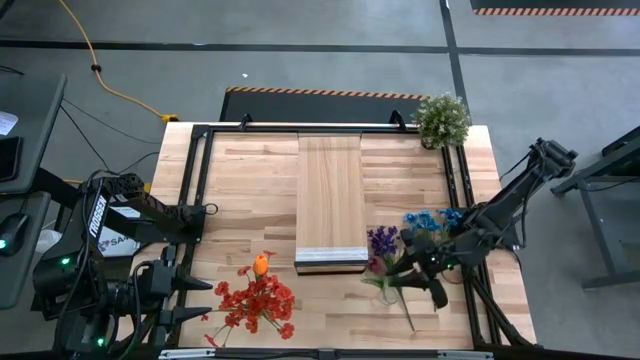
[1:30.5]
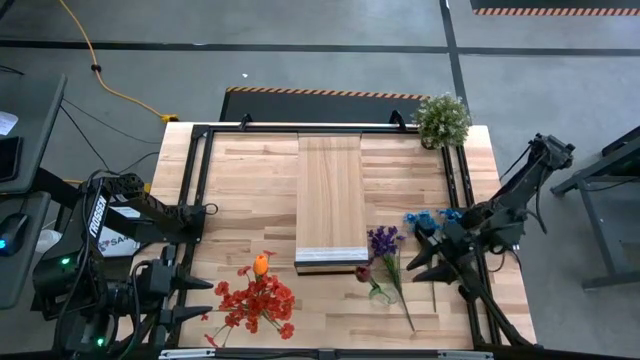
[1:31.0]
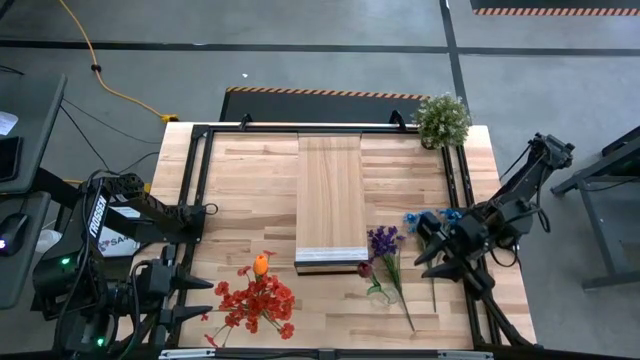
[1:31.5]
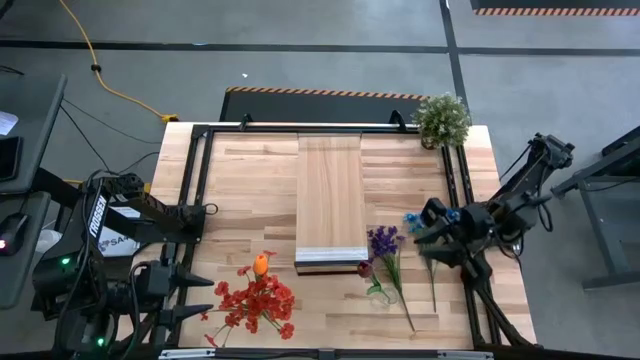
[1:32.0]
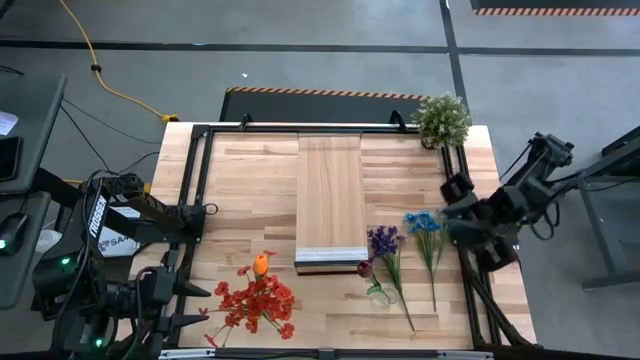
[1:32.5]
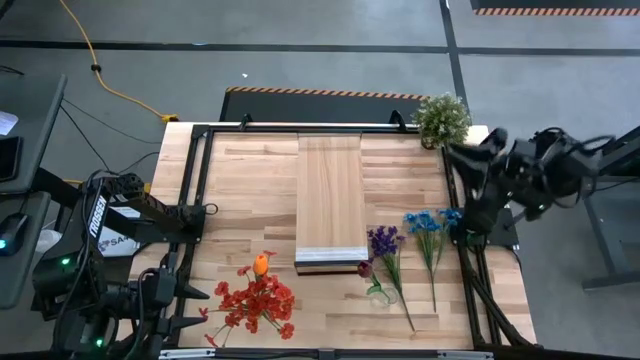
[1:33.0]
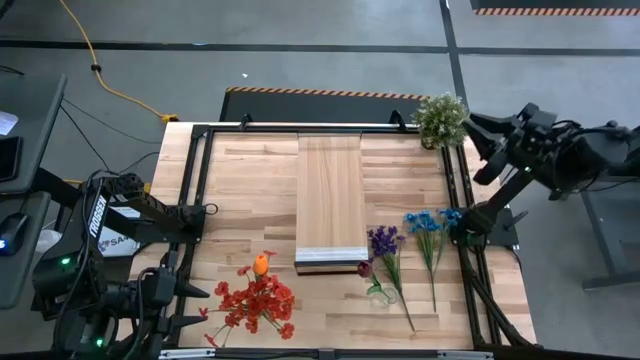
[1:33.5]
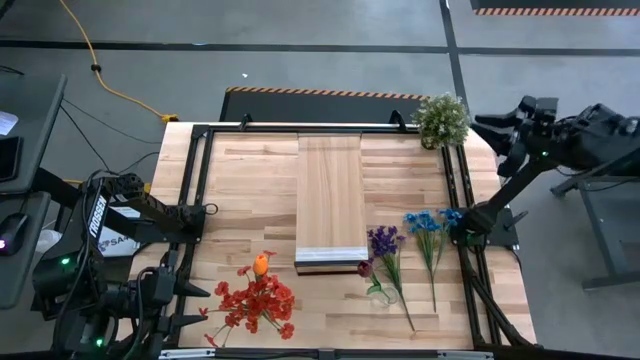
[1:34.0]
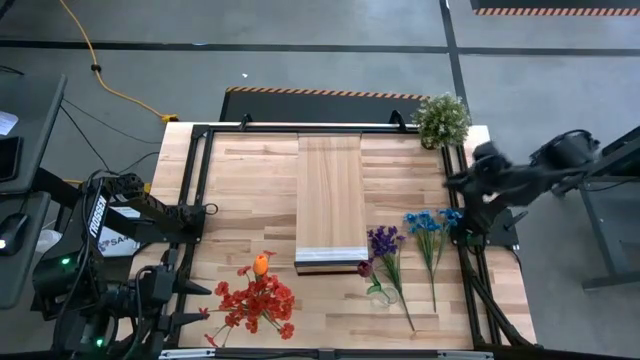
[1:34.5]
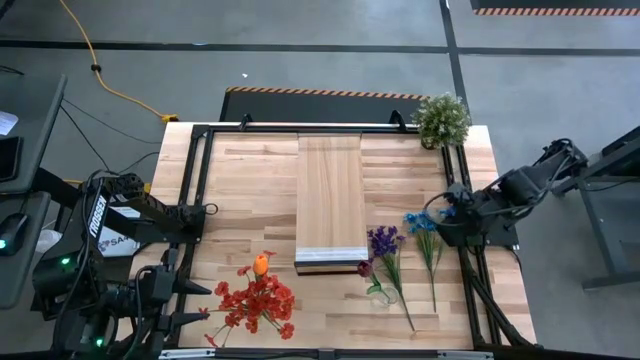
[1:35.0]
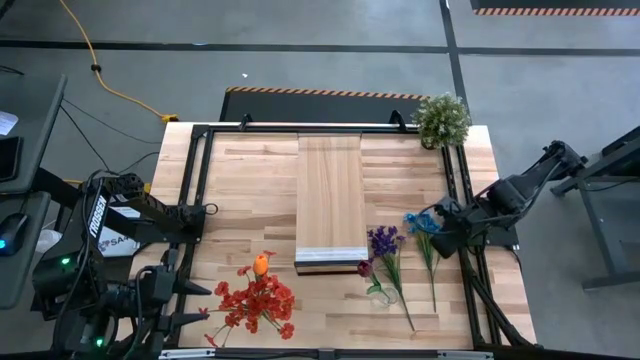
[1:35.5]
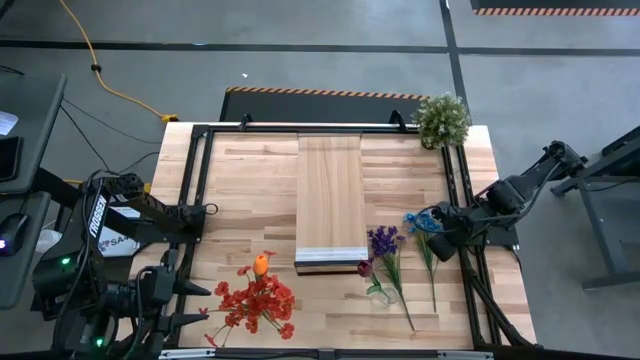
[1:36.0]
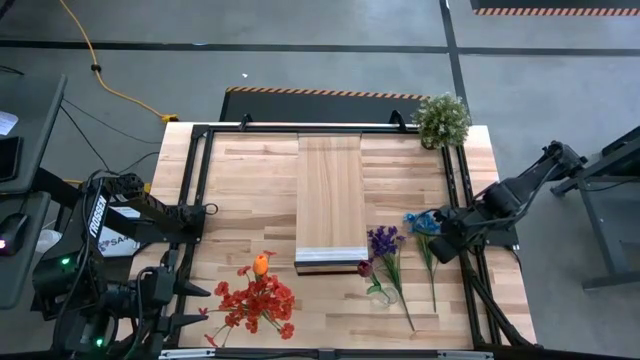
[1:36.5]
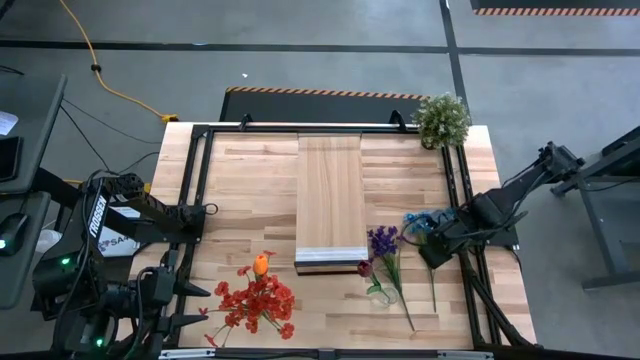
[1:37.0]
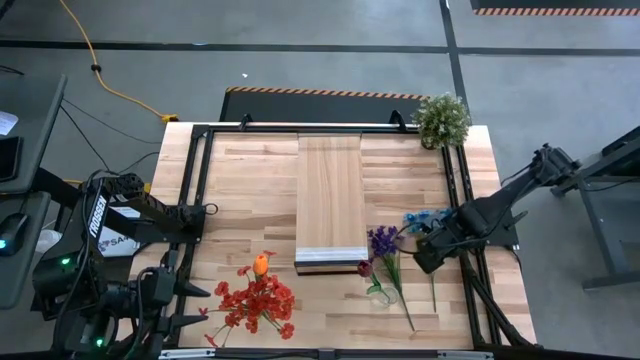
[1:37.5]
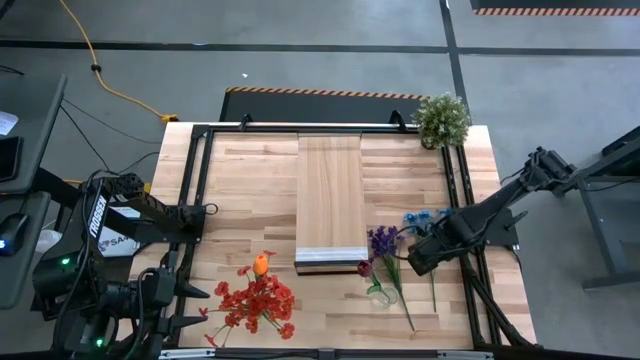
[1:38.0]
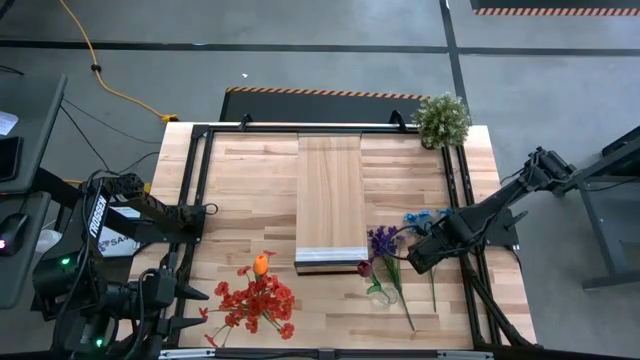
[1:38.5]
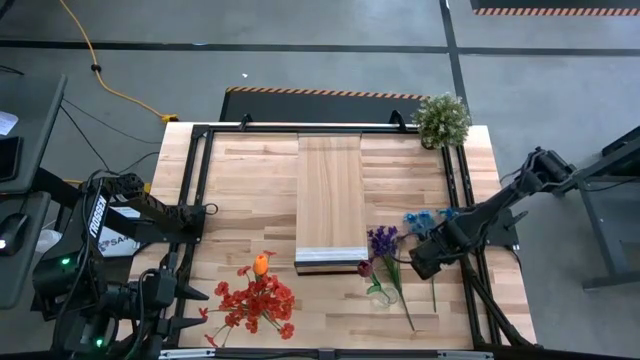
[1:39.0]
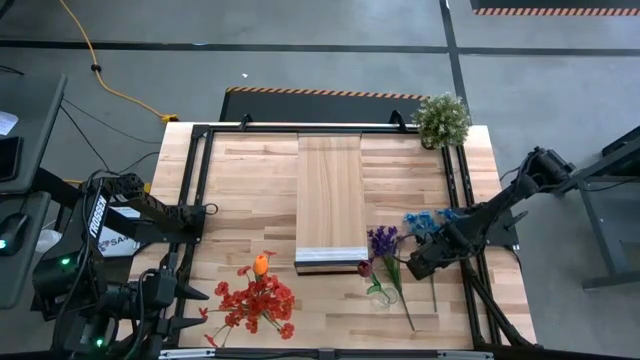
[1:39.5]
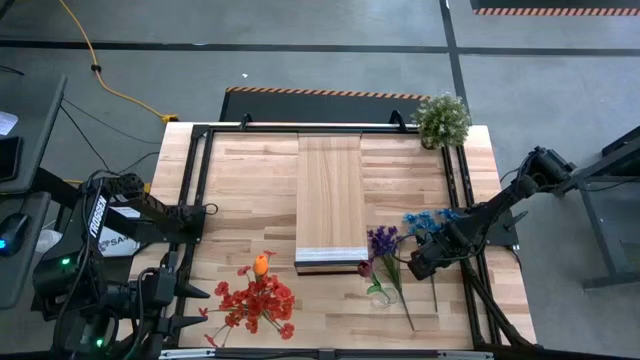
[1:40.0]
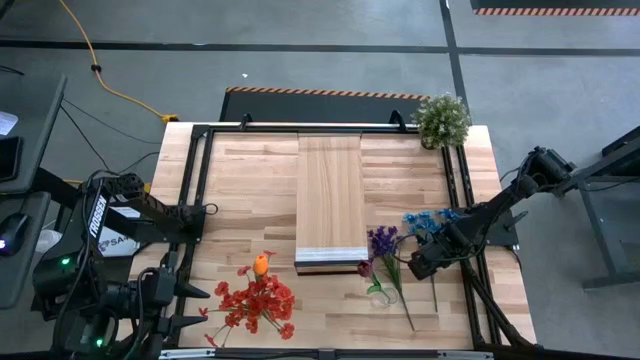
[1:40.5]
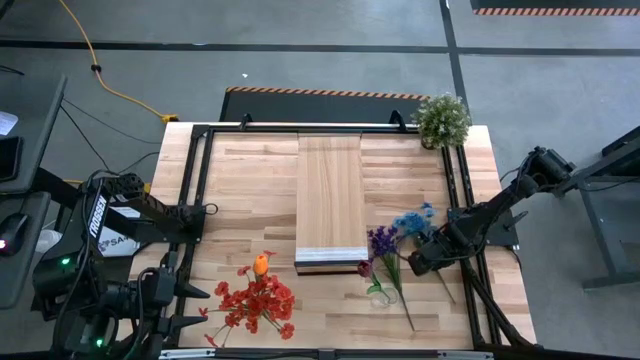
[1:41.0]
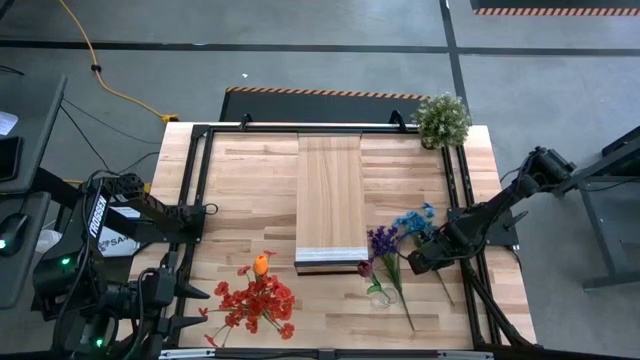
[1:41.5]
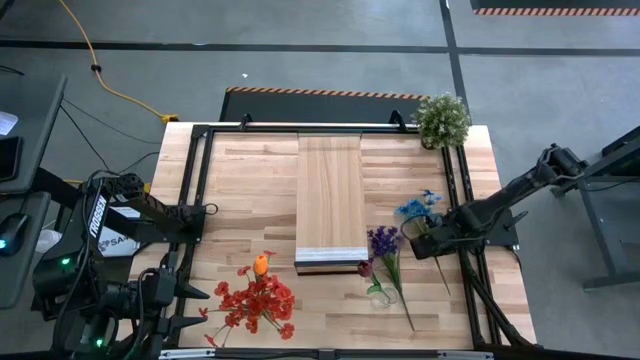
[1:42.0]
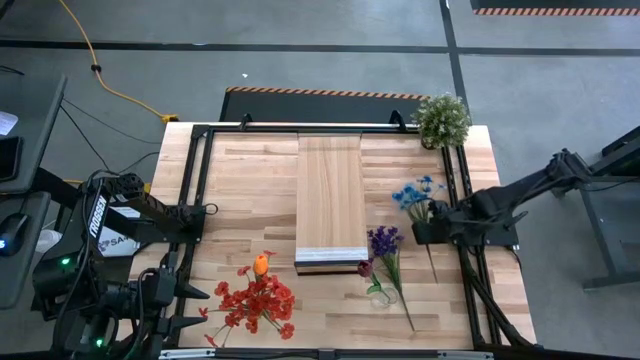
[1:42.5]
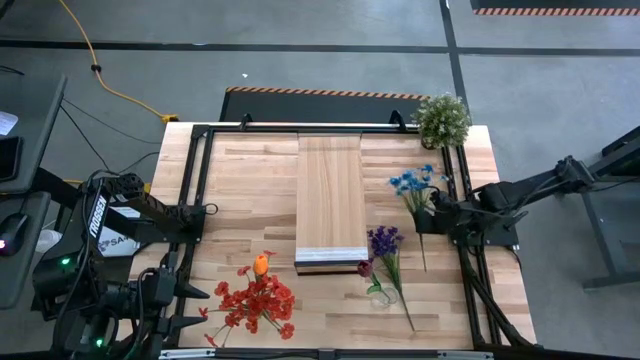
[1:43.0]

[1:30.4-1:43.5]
Task: Pick and place flowers into a vace then onto a shelf
Put the blue flowers into the right transparent vase

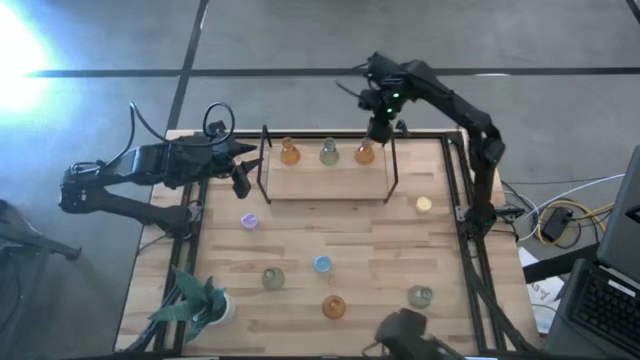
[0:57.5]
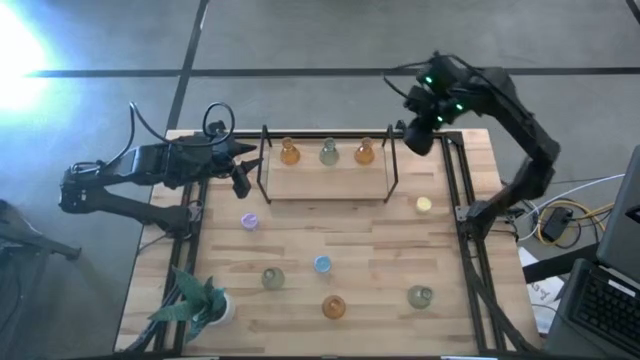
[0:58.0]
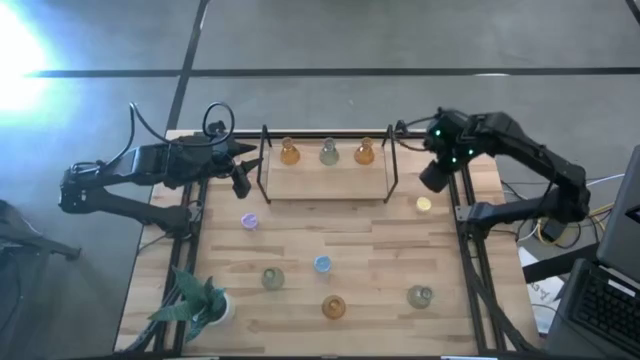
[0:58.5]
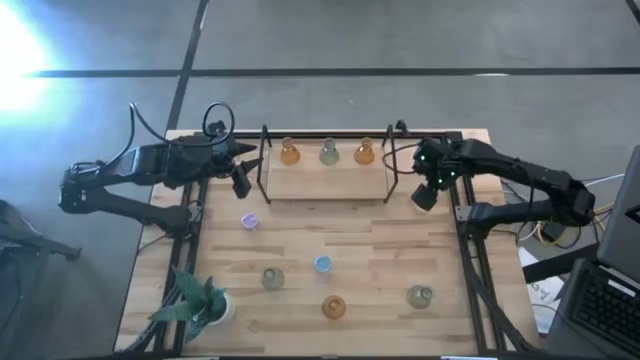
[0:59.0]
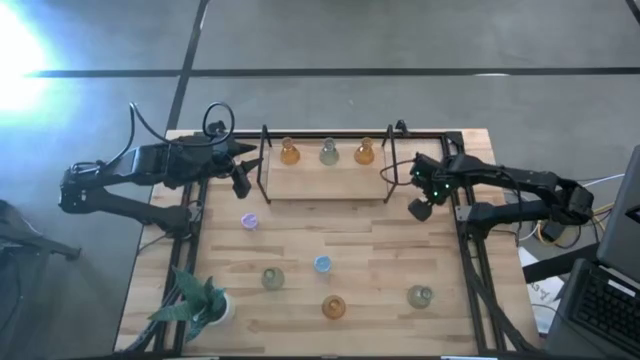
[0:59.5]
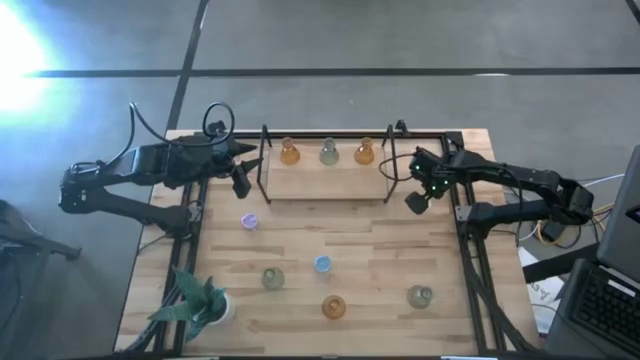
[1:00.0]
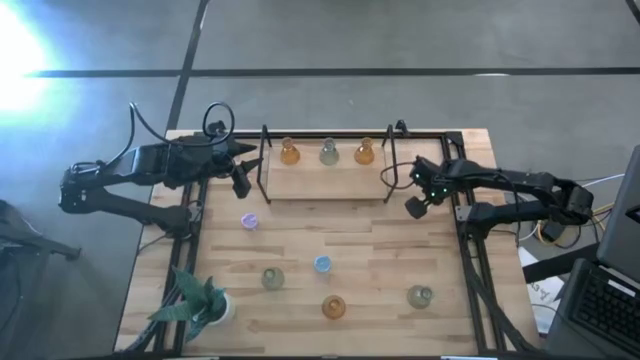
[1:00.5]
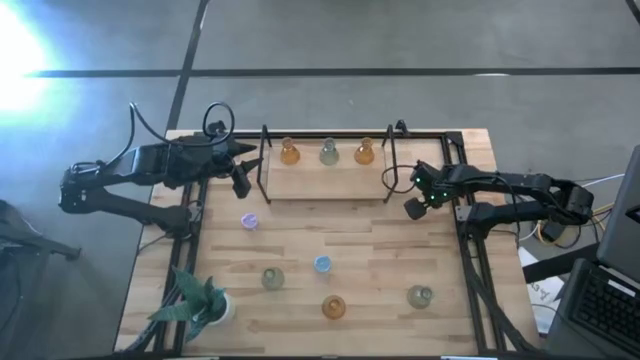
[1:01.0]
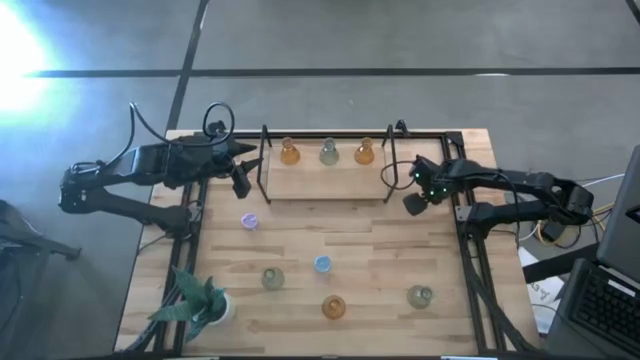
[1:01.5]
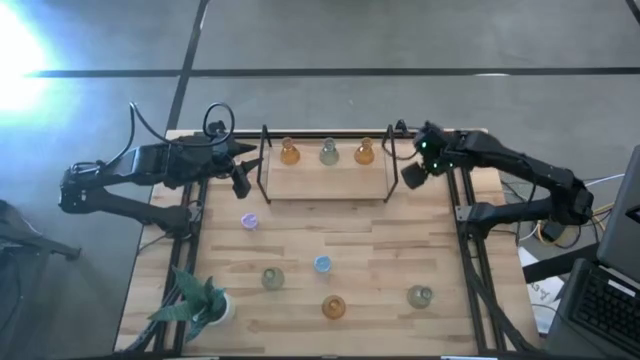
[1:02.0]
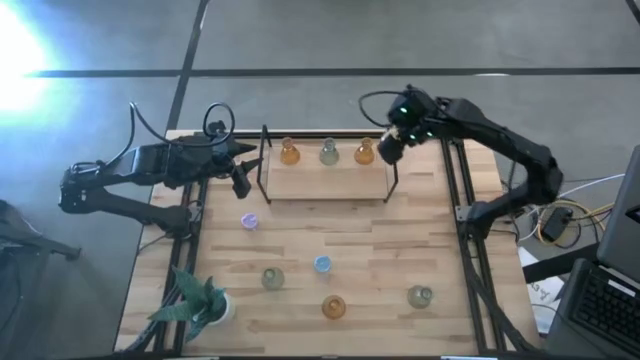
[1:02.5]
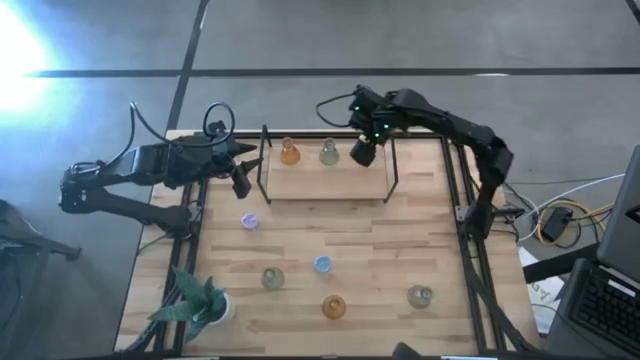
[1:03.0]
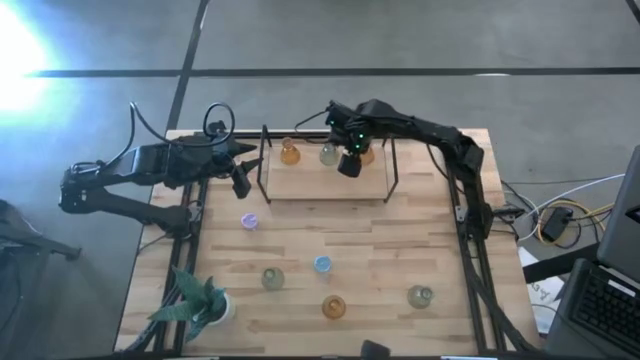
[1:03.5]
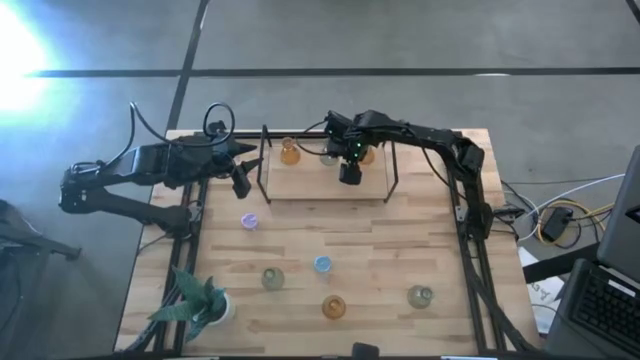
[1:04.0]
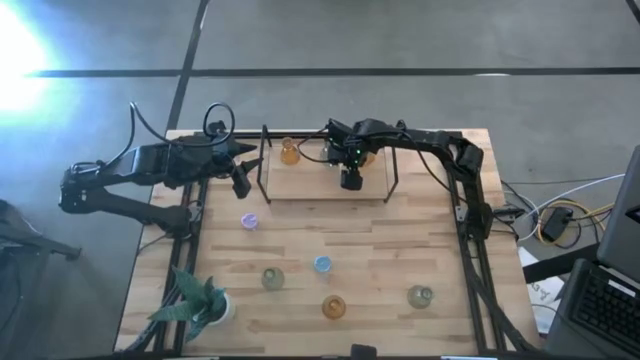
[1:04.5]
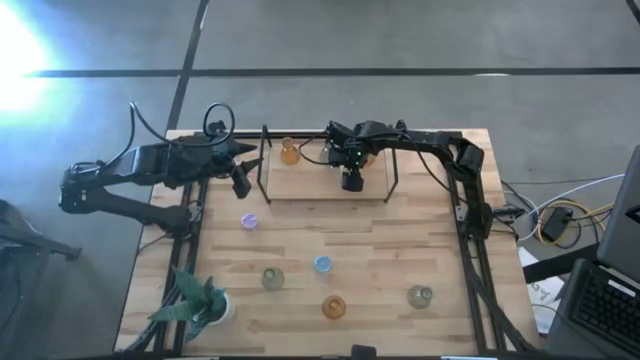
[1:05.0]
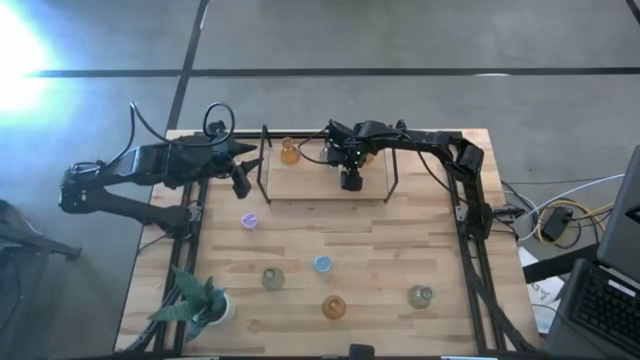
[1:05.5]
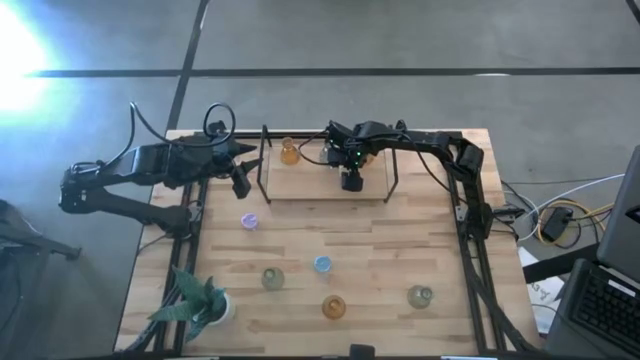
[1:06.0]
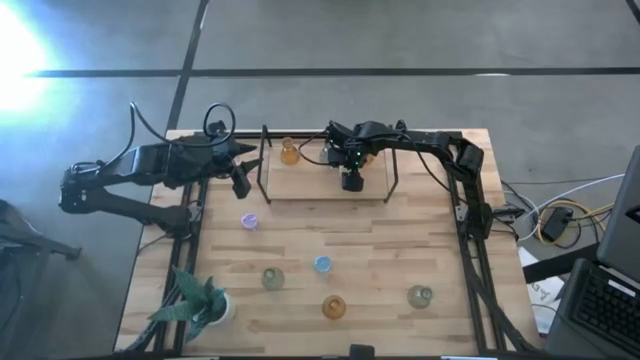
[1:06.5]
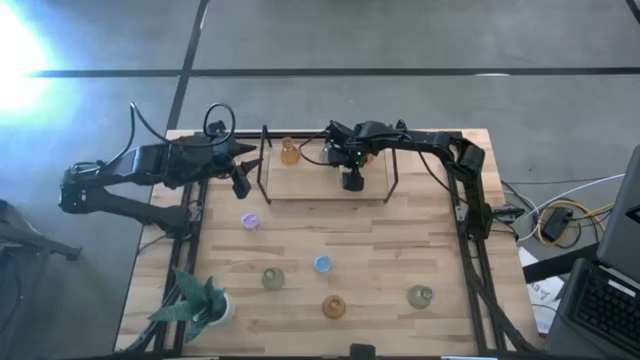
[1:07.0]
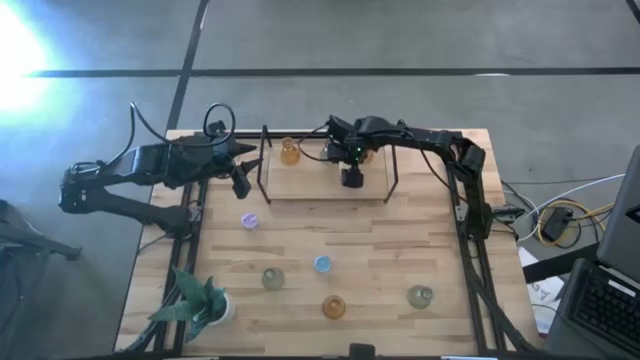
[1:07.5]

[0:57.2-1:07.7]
Task: Pick & Place candle stick holders
Put the light yellow candle on the shelf
